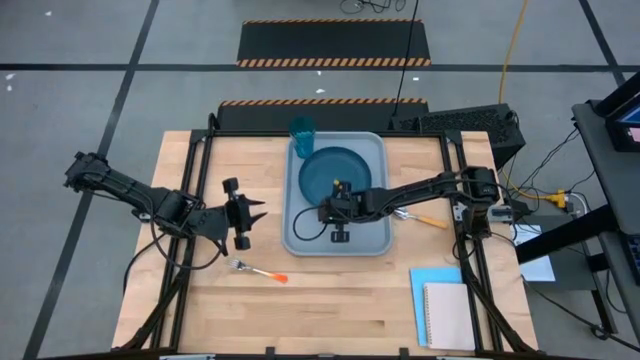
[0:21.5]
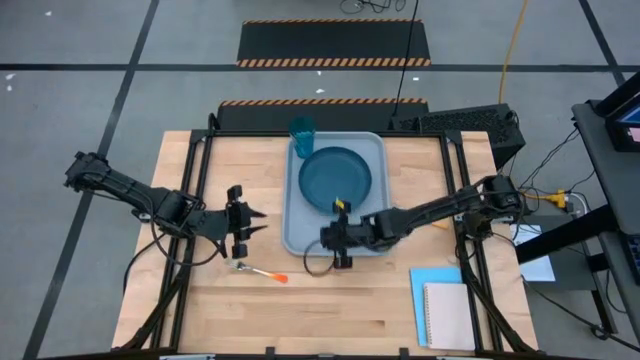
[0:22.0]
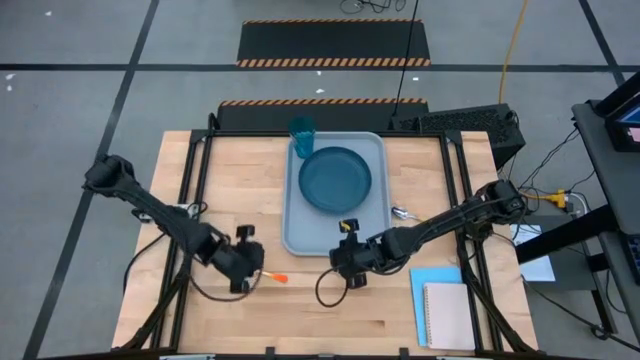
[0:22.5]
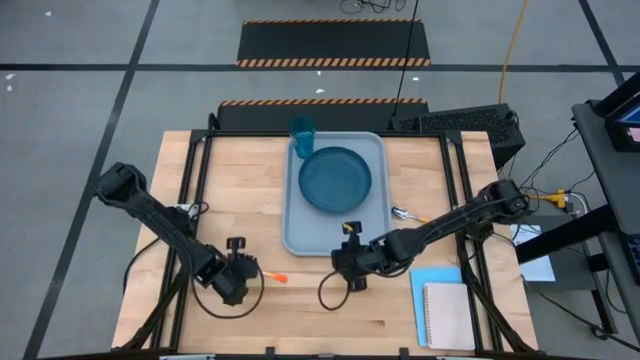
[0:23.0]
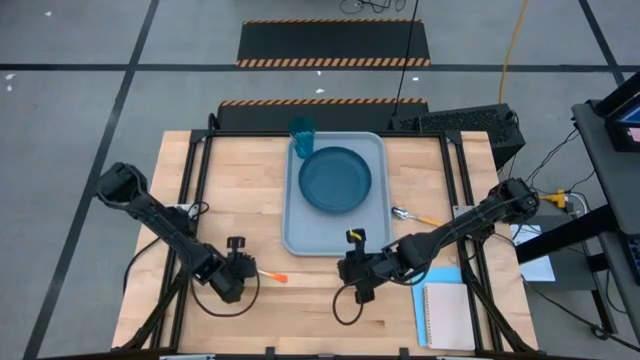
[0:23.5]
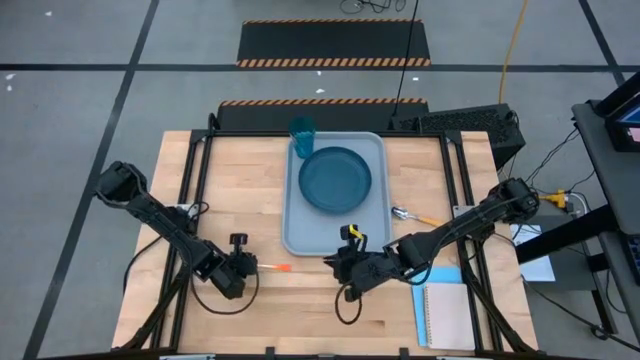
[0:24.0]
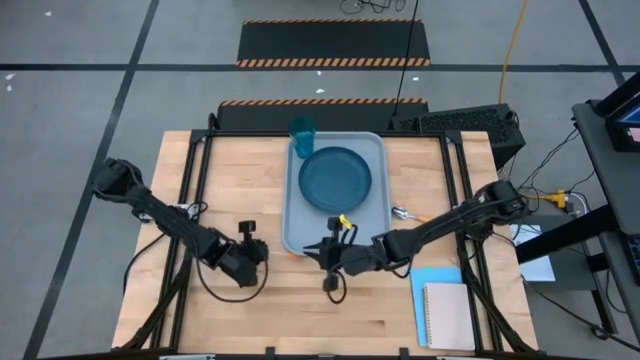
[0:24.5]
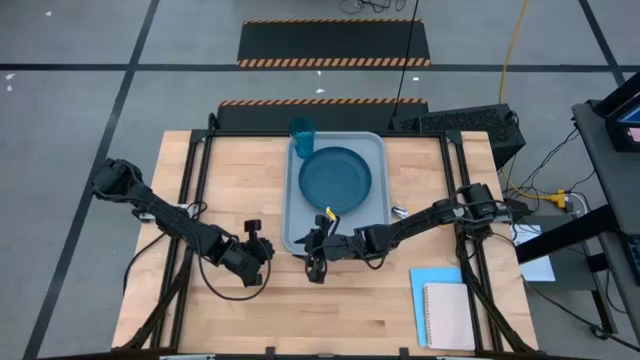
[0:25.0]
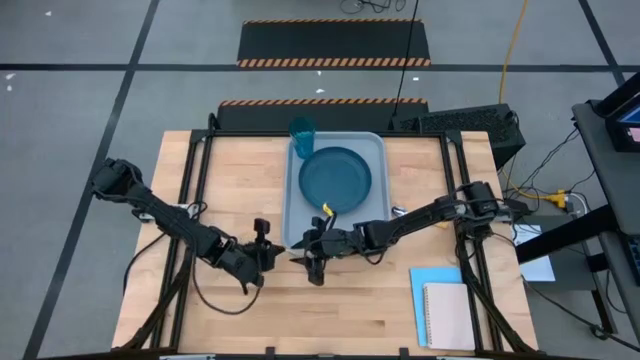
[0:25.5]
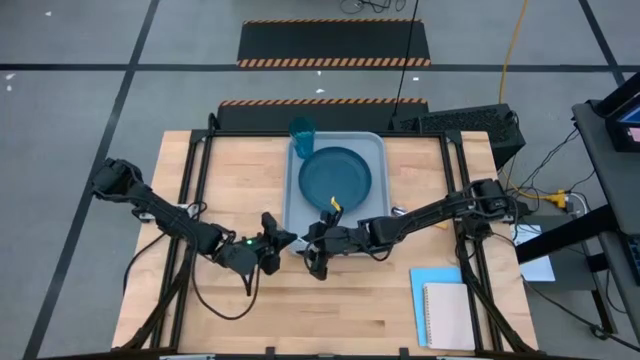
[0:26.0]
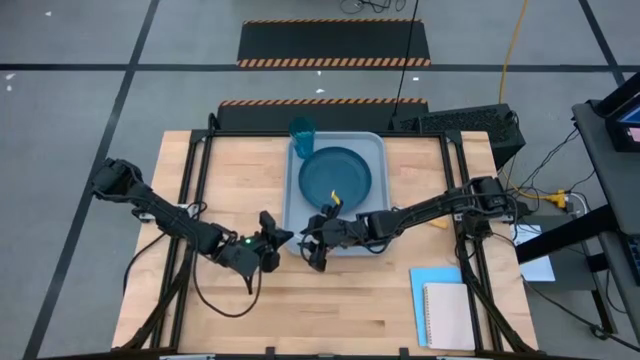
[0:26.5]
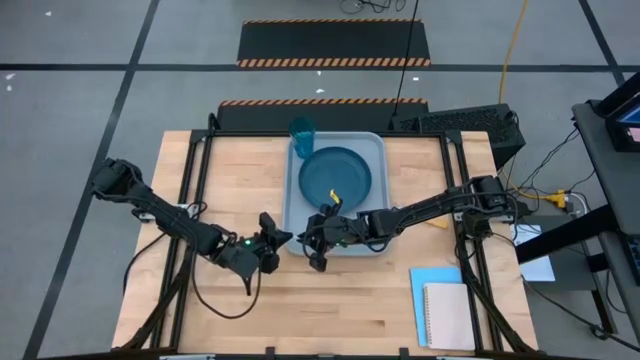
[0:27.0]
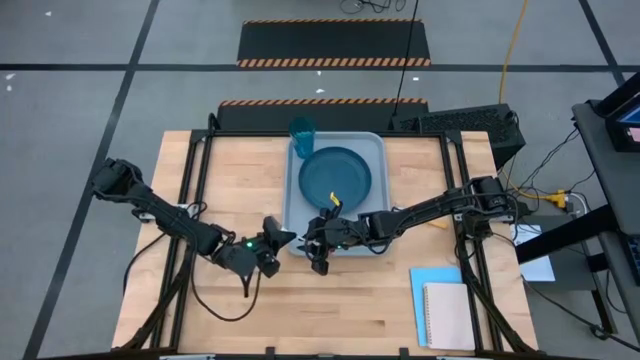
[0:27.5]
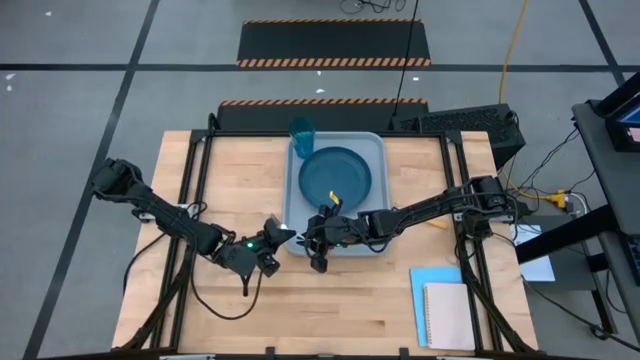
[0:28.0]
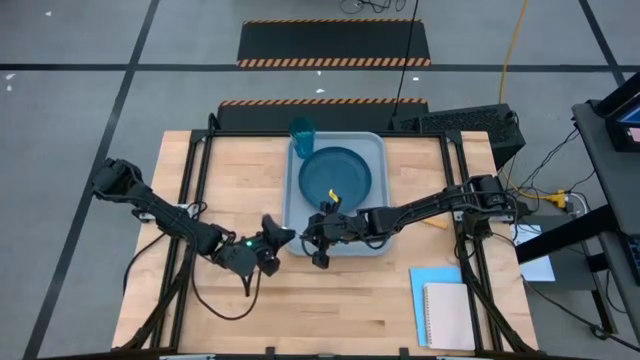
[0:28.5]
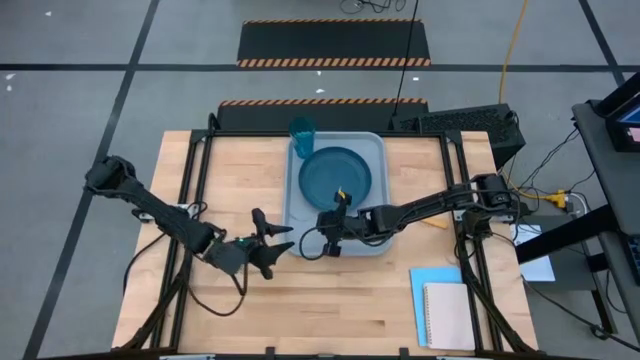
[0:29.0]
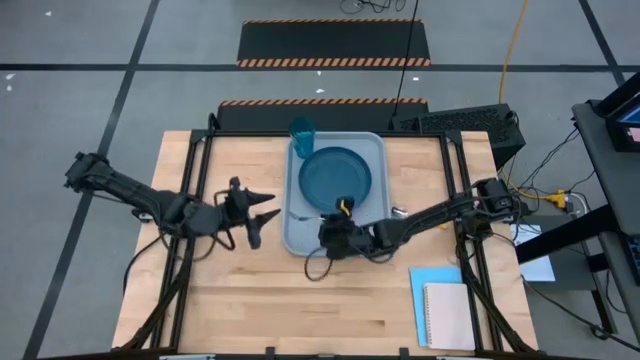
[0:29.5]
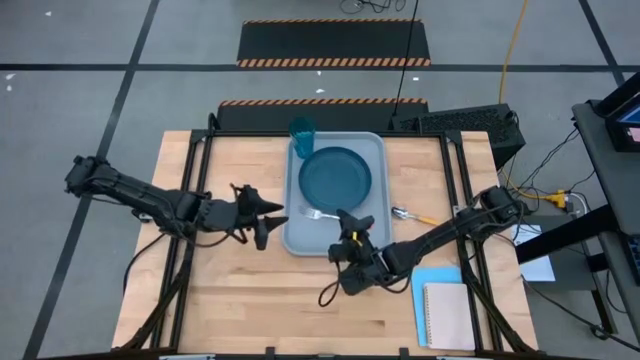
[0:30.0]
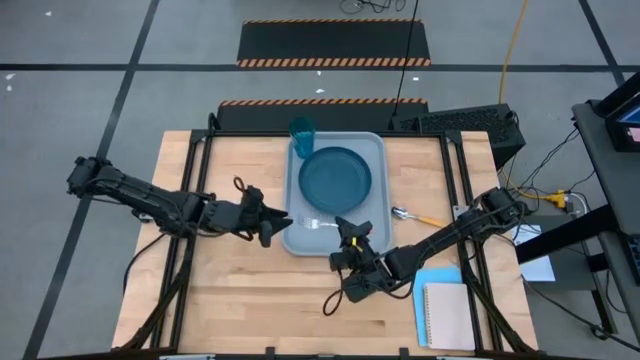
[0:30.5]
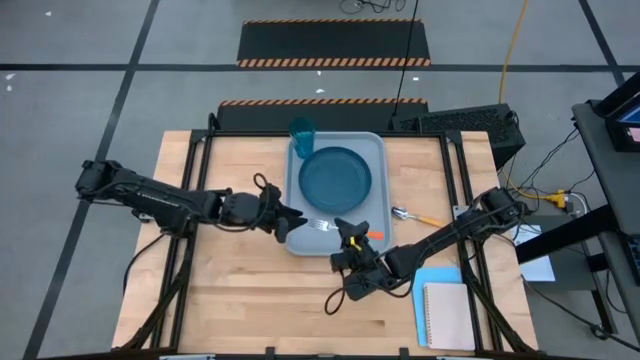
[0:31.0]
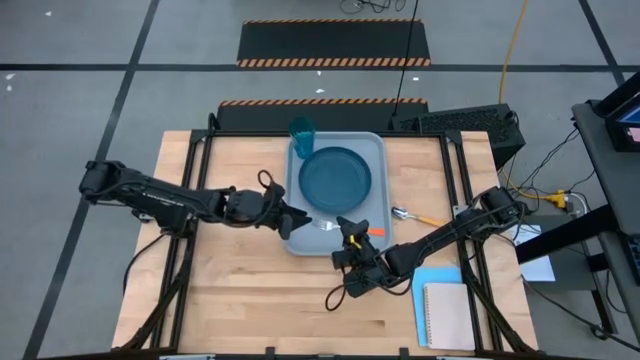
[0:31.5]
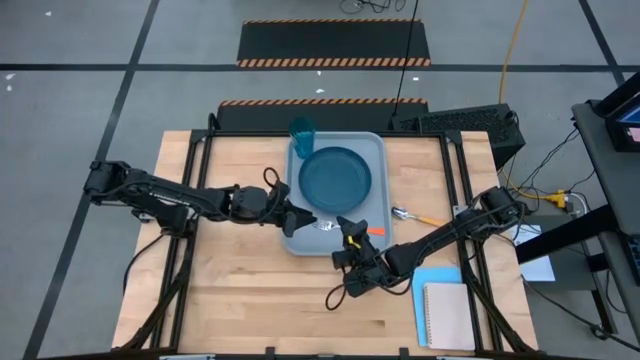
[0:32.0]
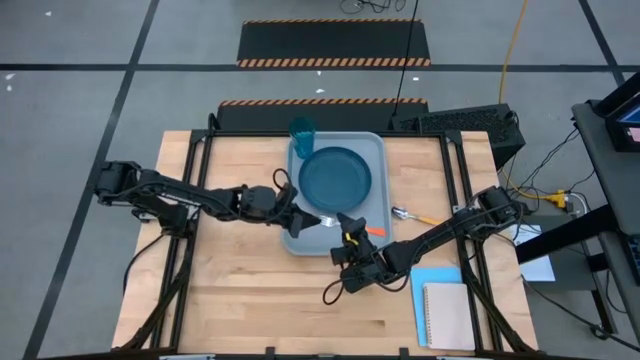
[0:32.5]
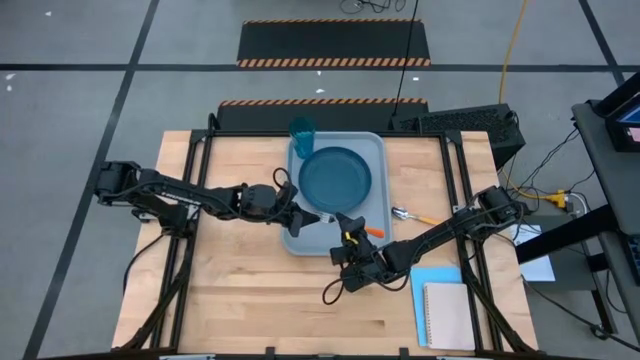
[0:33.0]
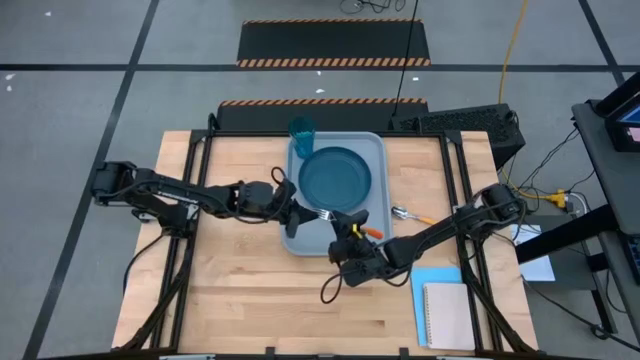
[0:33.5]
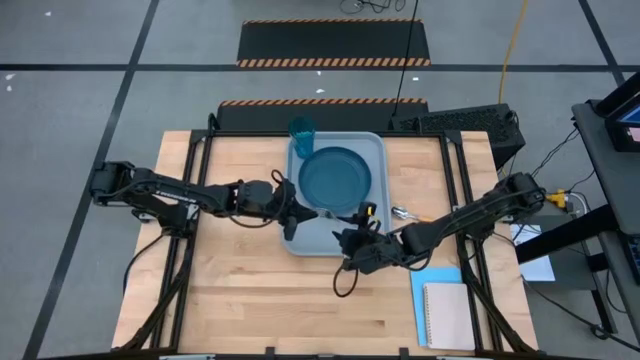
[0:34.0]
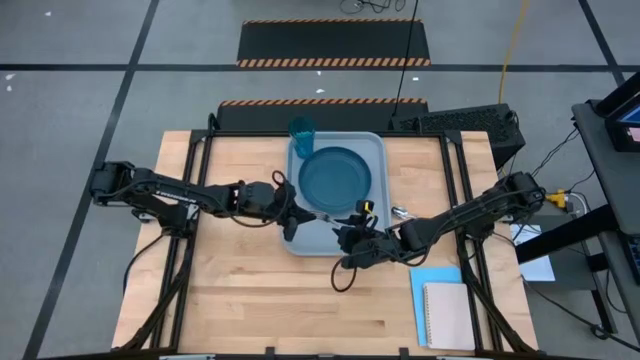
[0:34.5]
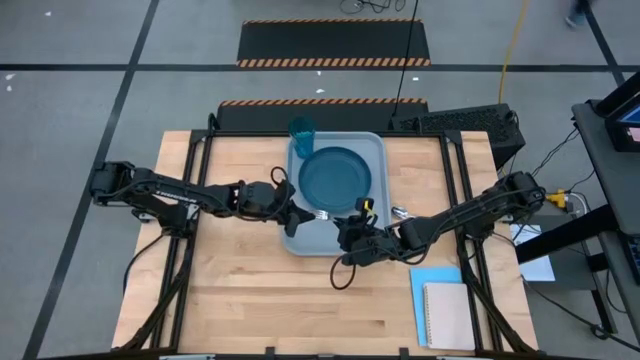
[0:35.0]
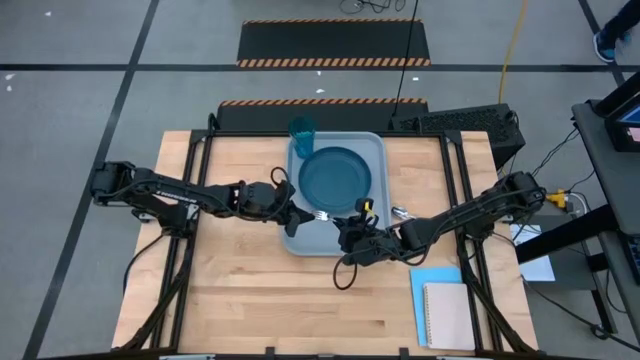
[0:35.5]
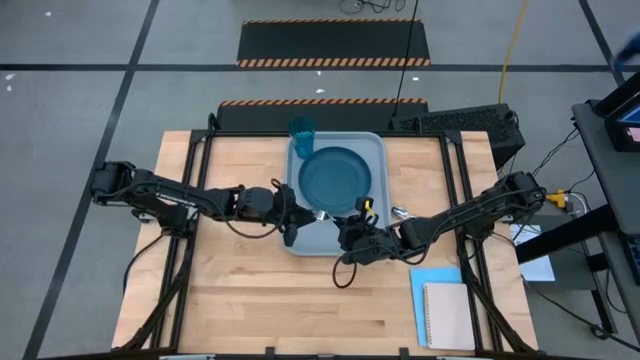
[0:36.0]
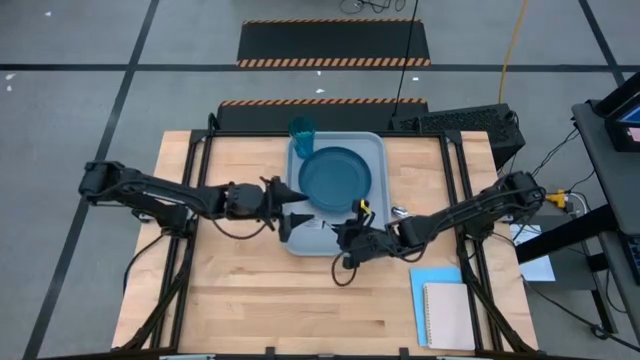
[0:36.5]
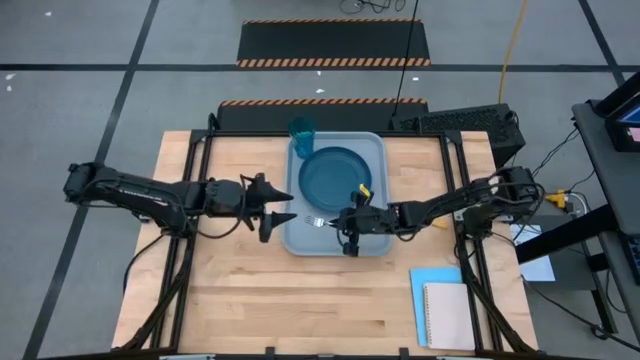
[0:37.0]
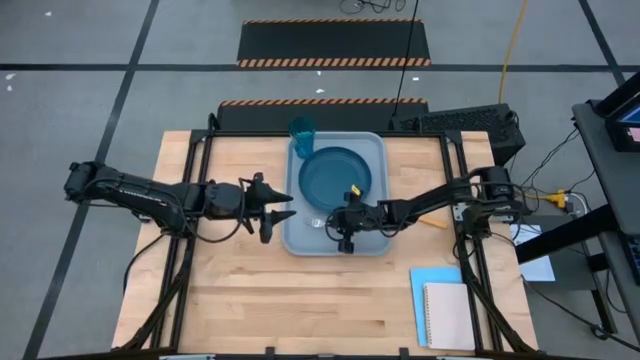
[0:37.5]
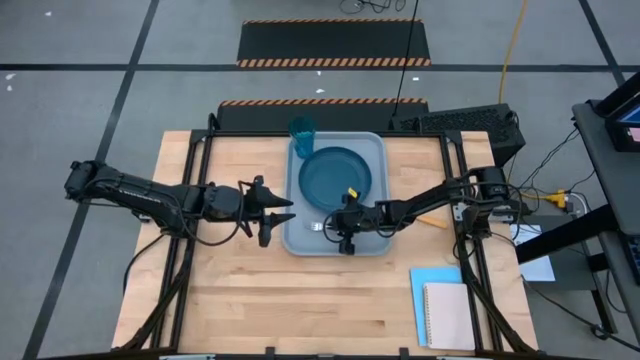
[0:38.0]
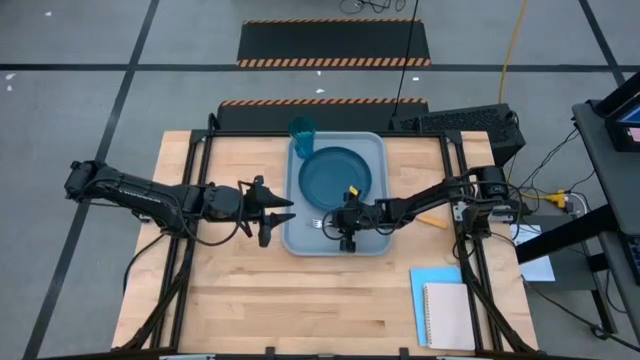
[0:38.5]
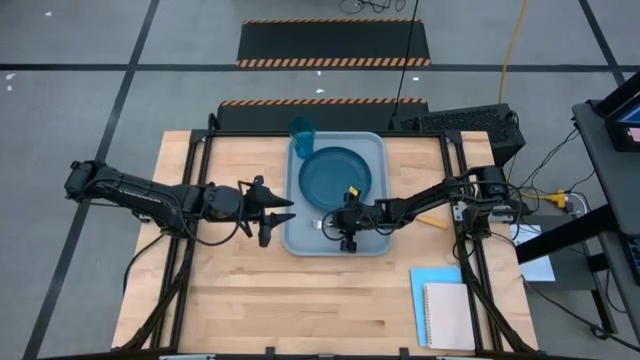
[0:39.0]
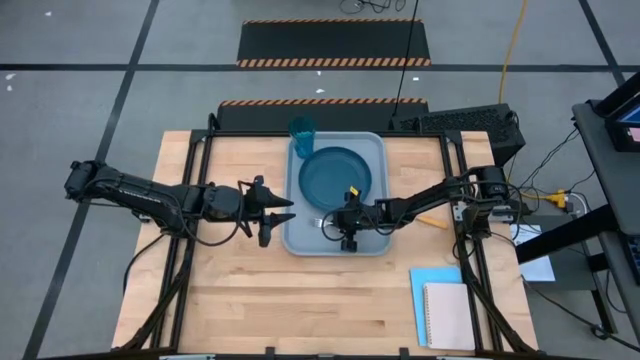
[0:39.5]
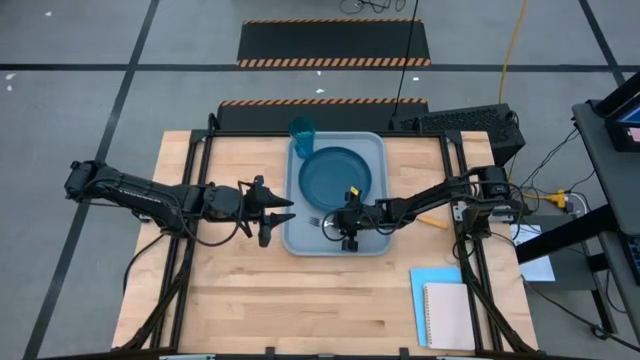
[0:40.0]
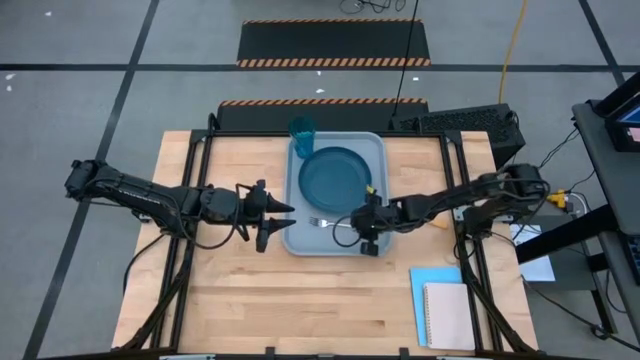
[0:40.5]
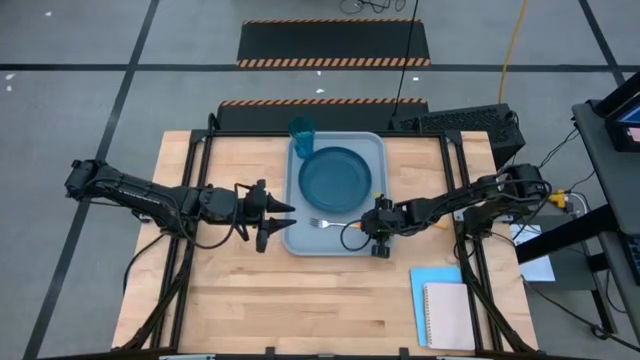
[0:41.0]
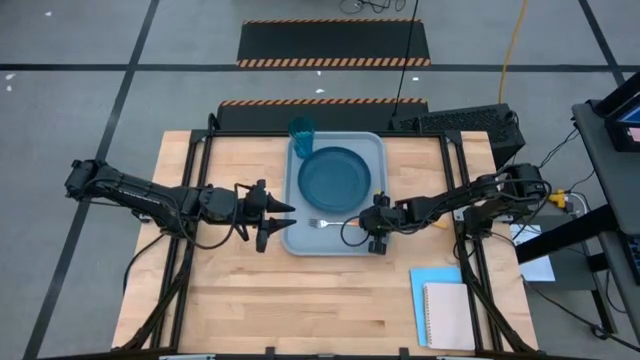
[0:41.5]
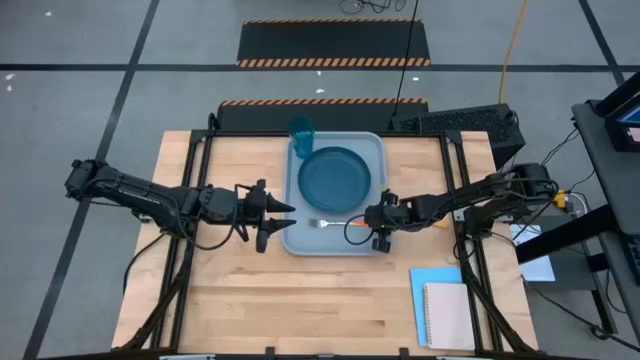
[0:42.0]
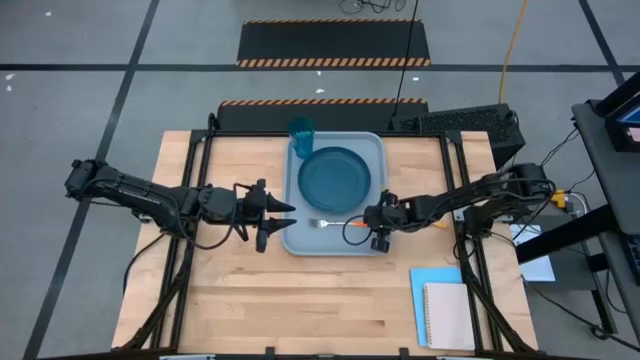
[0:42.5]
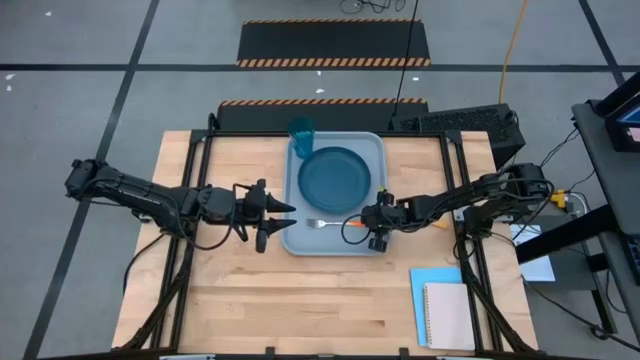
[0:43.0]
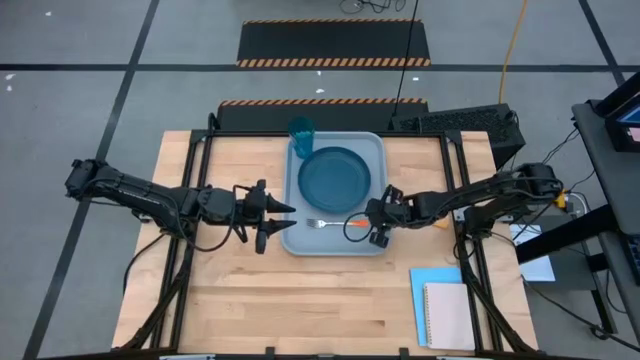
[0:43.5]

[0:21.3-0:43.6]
Task: Pick and place plate/cup/fork/spoon on tray
Put the orange fork on the gray serving tray to the left of the blue plate
